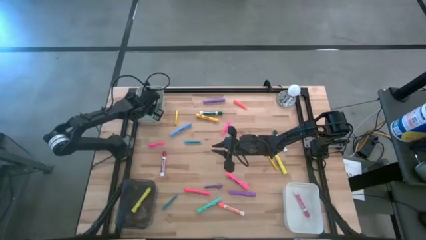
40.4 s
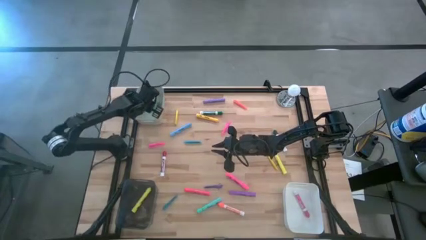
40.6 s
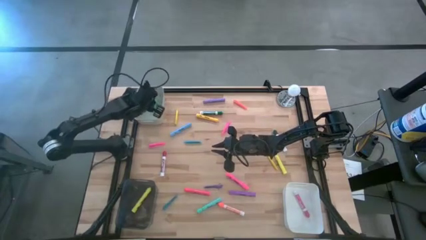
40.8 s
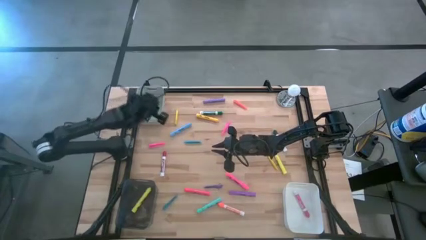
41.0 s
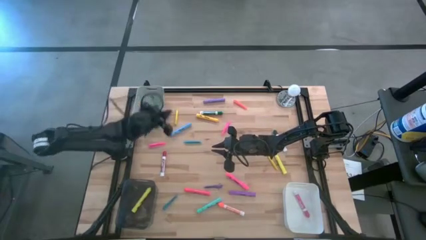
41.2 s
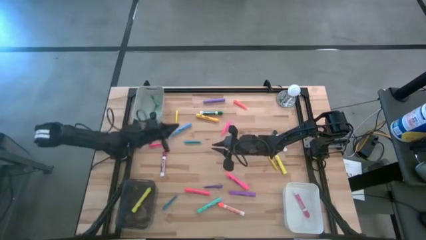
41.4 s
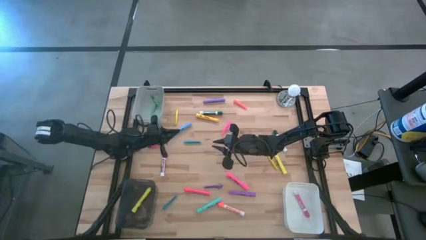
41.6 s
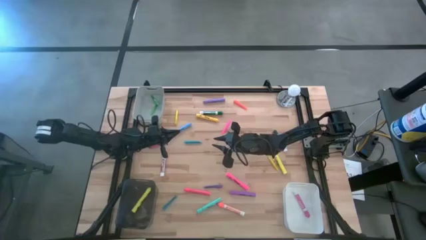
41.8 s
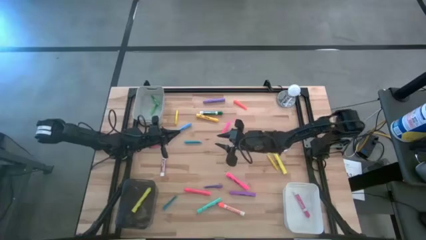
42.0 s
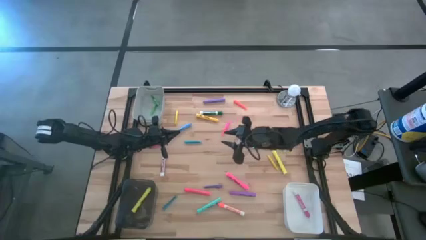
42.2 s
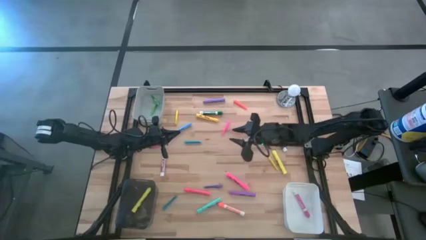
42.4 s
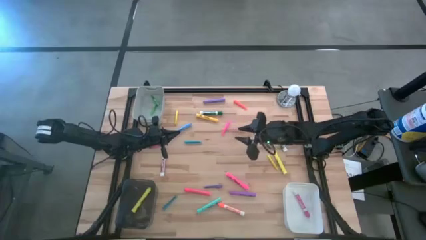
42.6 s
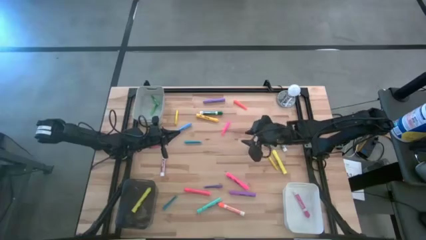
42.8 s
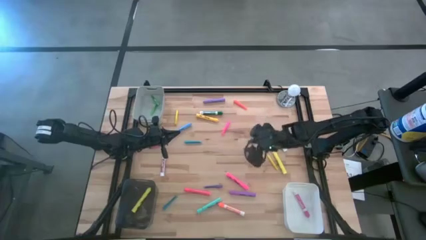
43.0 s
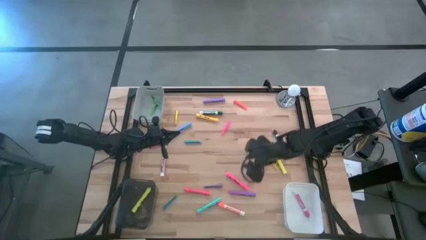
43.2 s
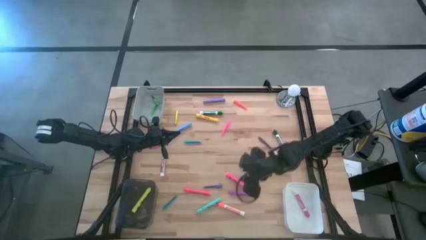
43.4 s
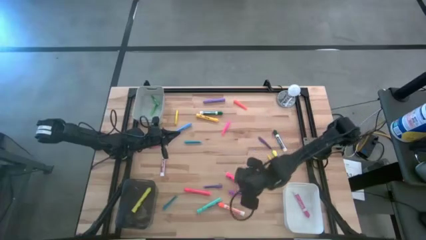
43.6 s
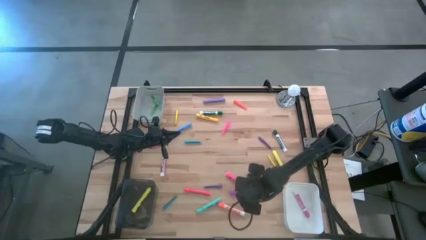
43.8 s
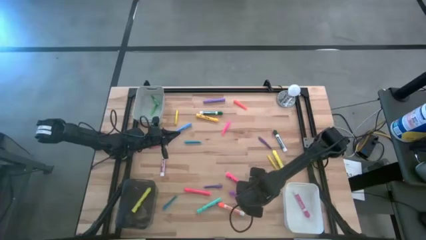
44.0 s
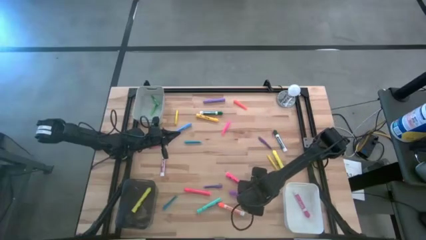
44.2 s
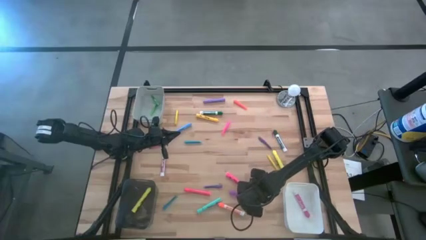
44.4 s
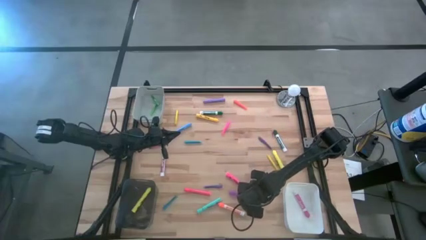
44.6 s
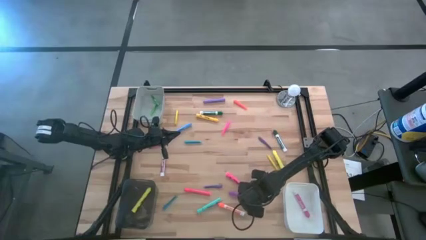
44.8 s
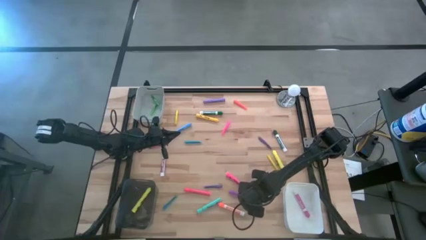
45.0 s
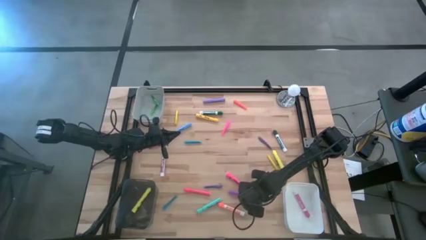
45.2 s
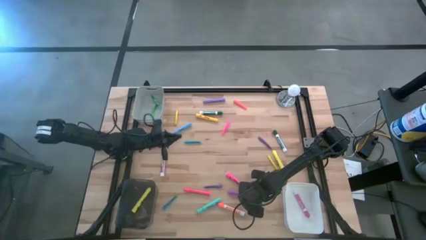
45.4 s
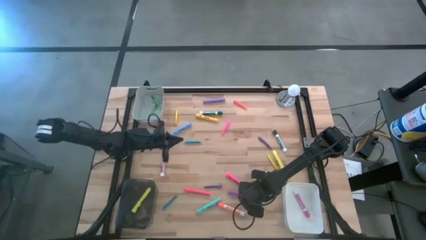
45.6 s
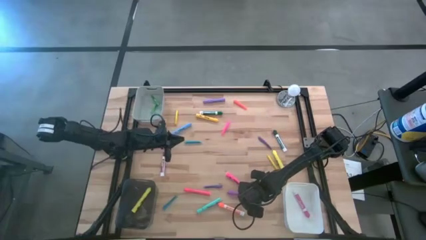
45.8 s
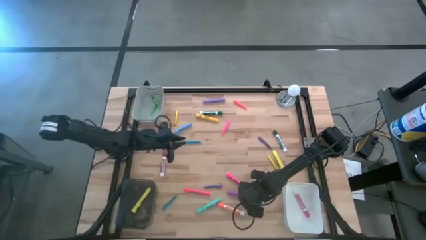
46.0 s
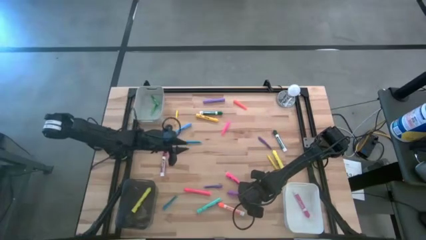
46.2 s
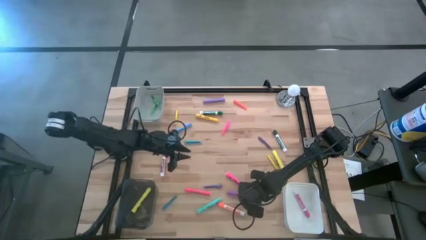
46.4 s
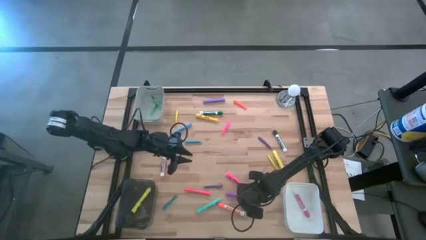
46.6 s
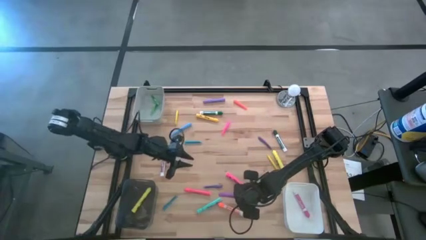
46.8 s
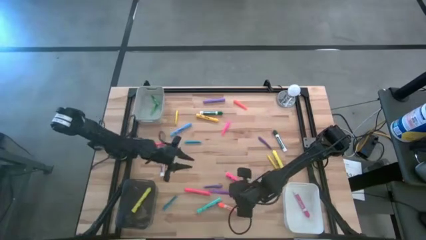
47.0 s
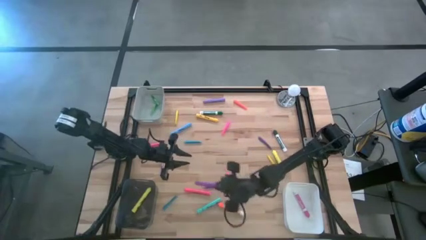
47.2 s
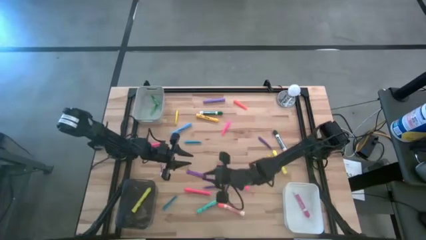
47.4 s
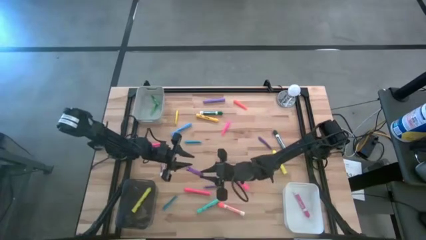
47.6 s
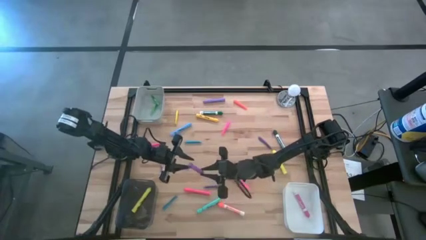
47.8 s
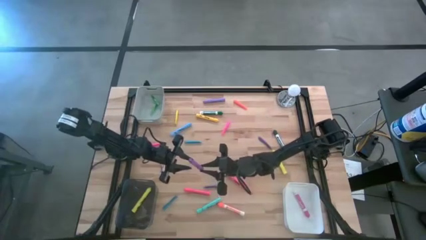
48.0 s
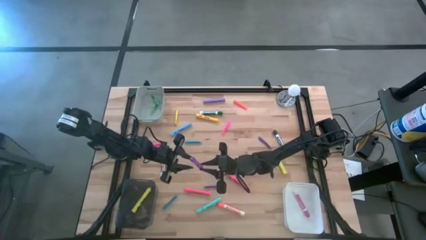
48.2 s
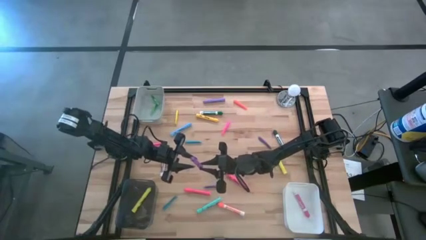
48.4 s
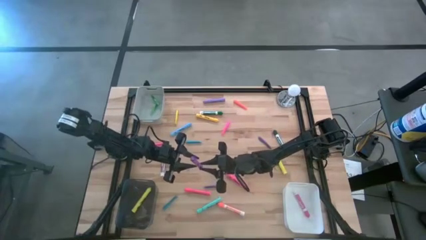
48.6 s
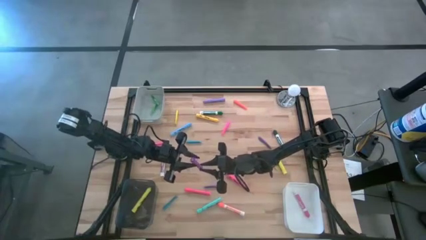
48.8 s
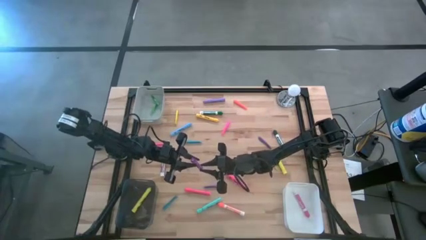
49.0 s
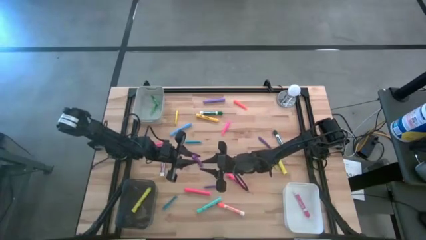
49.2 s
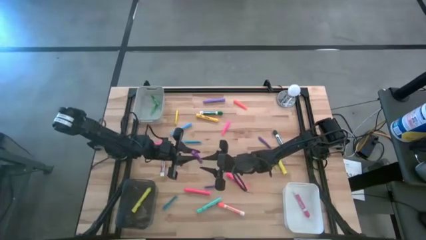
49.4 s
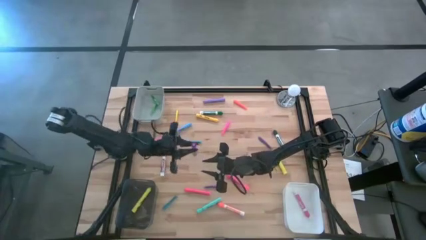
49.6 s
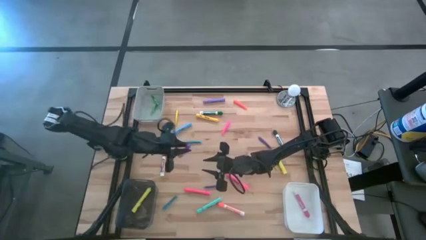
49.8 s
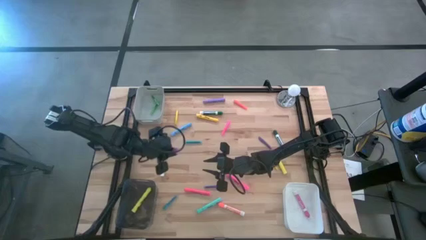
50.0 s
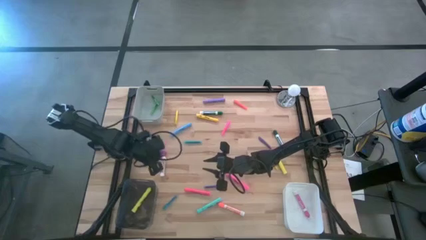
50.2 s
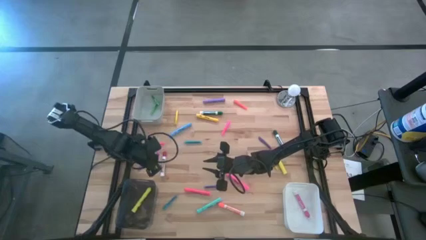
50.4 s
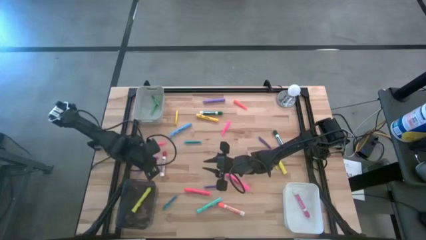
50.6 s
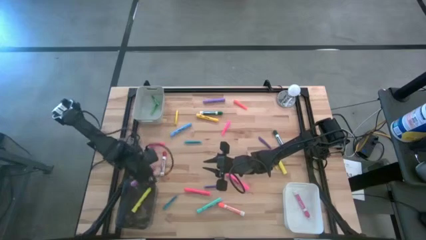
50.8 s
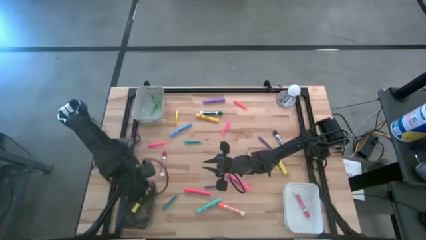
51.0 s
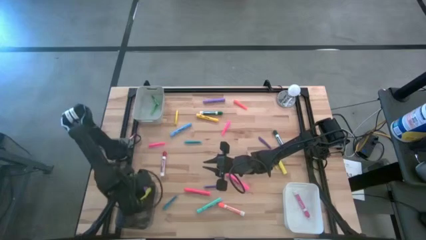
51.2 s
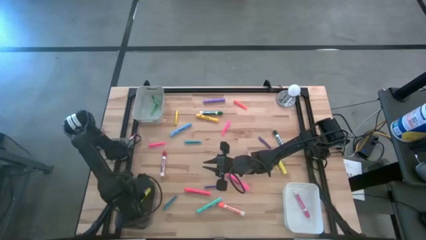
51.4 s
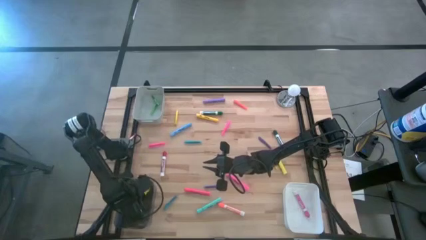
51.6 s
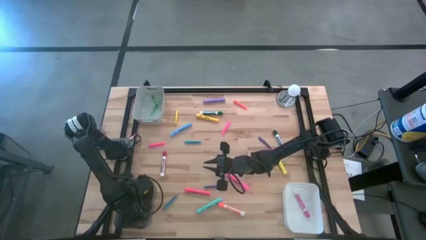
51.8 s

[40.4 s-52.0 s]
Task: Pick & Place Markers
Put the purple marker pen into the black bin

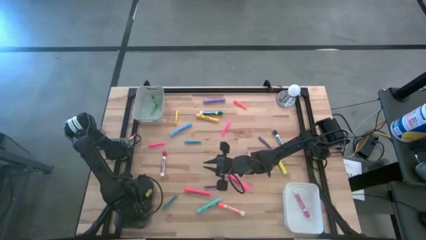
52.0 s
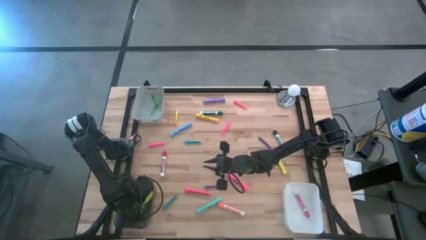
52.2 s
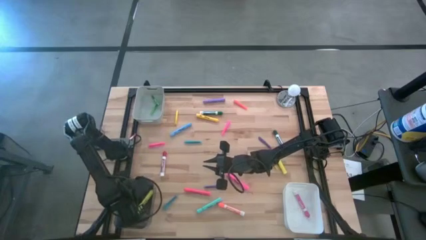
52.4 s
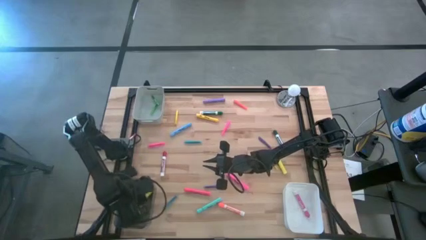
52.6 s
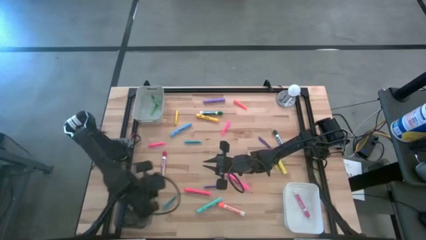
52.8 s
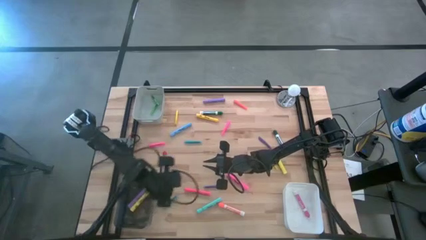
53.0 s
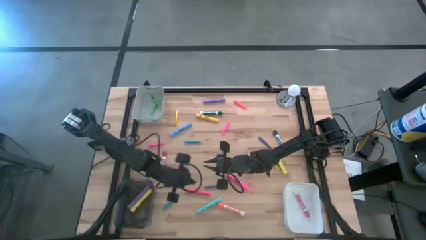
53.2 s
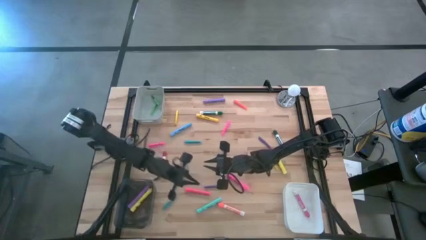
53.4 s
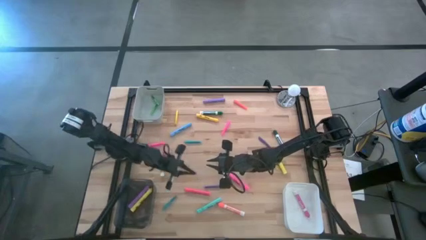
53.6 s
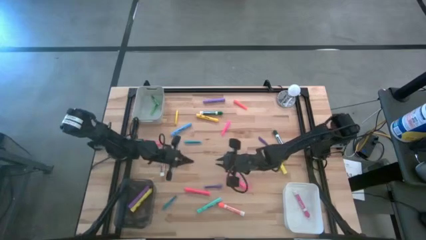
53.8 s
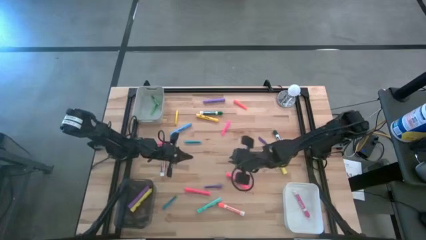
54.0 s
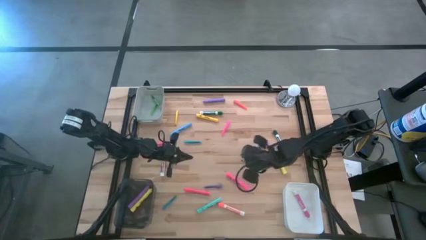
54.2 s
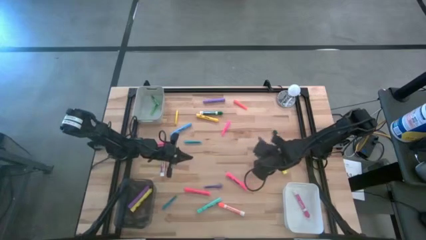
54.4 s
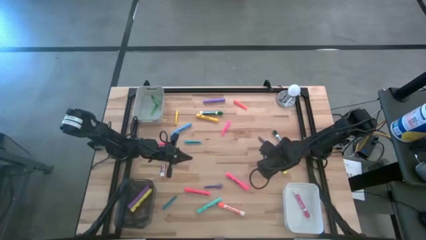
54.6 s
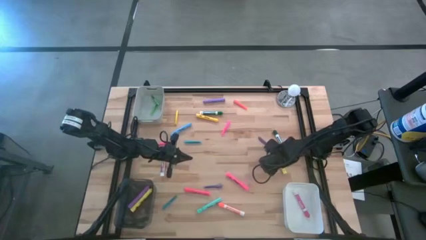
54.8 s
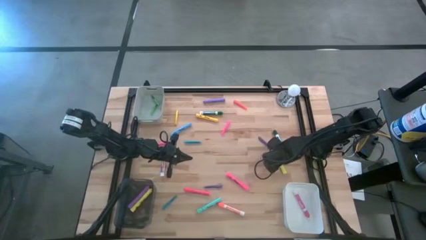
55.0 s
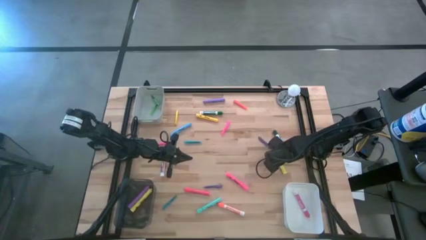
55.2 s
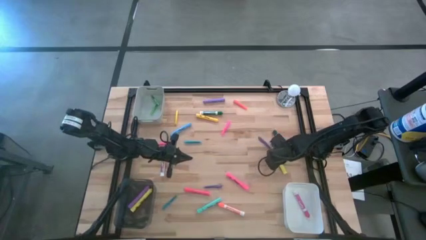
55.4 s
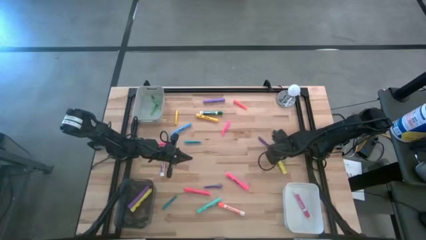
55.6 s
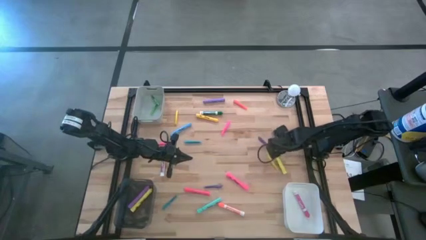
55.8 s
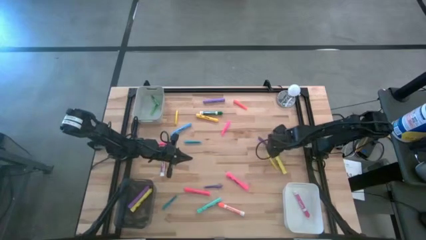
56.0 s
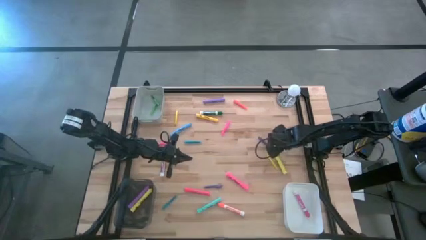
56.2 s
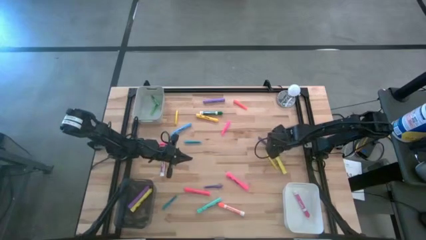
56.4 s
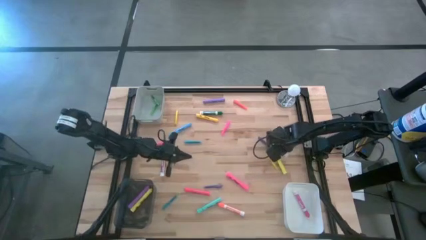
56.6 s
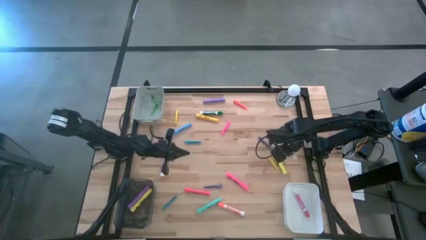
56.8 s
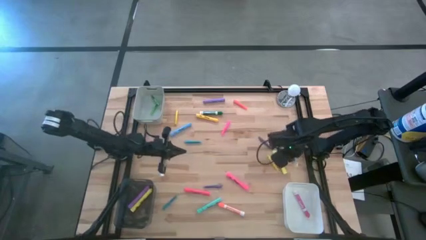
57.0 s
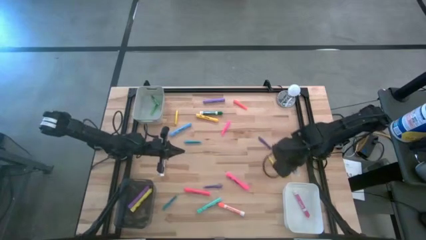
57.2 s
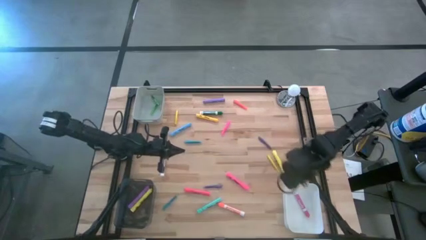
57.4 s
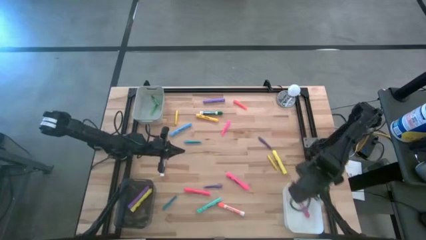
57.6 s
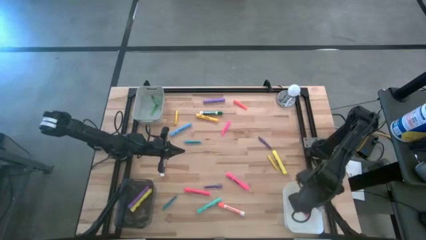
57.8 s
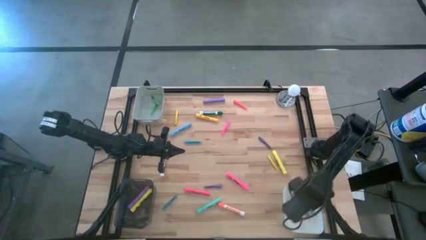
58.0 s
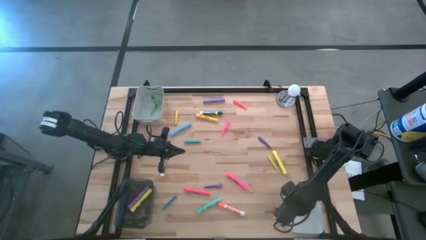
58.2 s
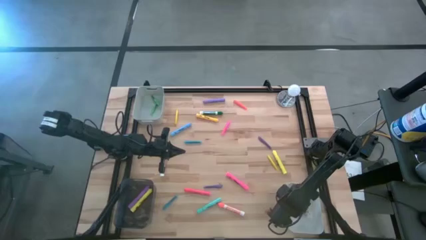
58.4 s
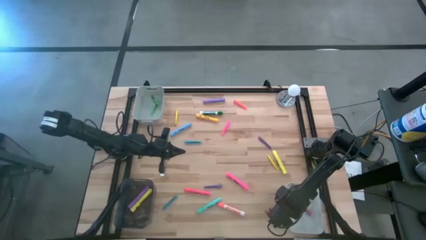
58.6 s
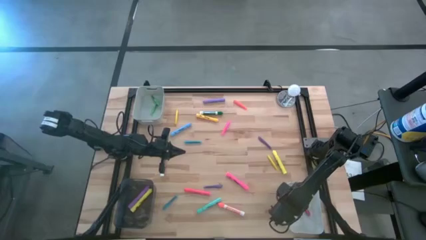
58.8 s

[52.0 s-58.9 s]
Put the bottom green marker pen into the white bin
